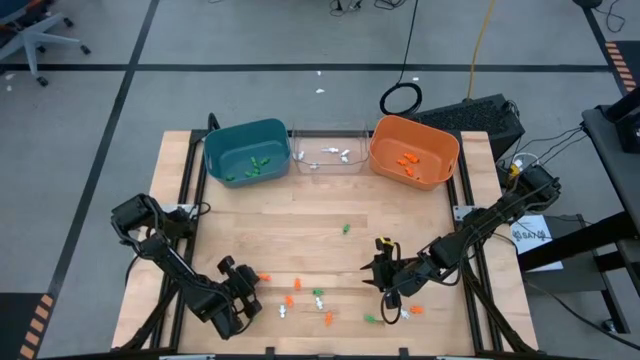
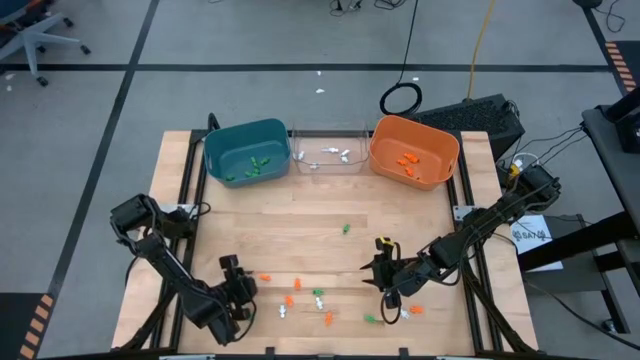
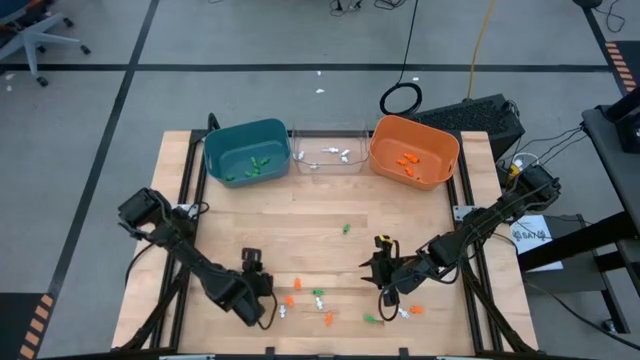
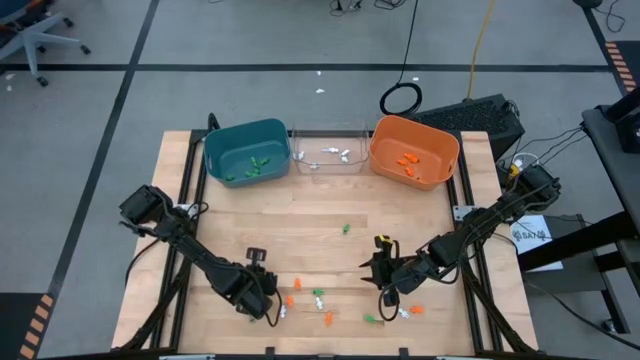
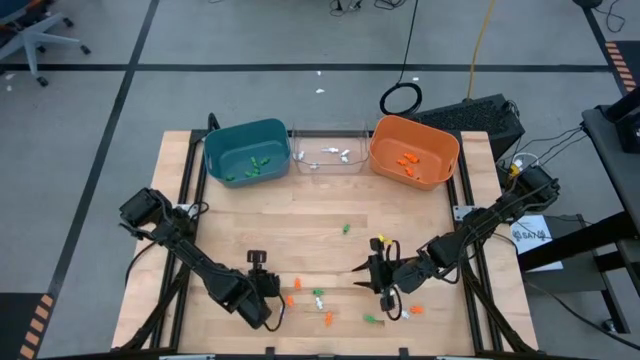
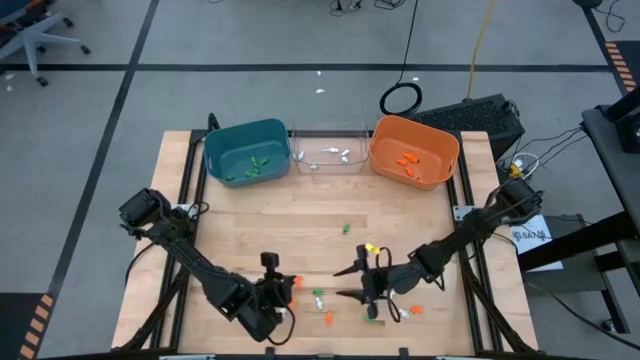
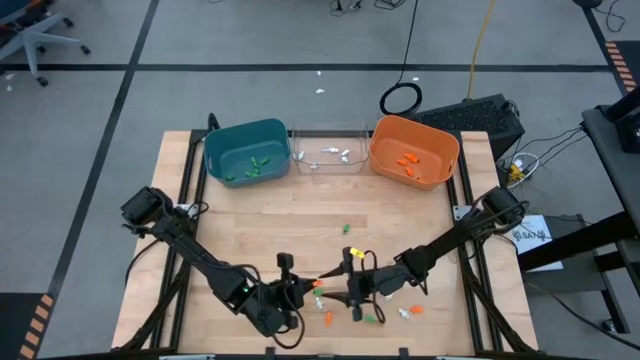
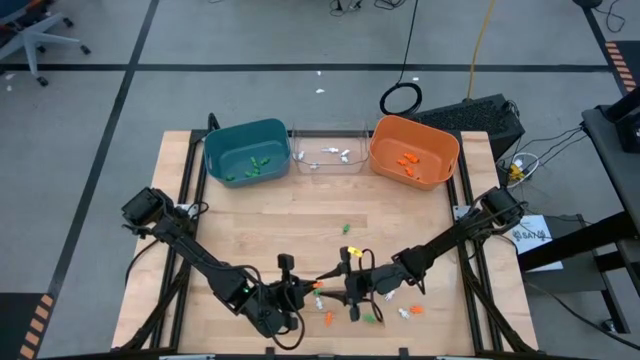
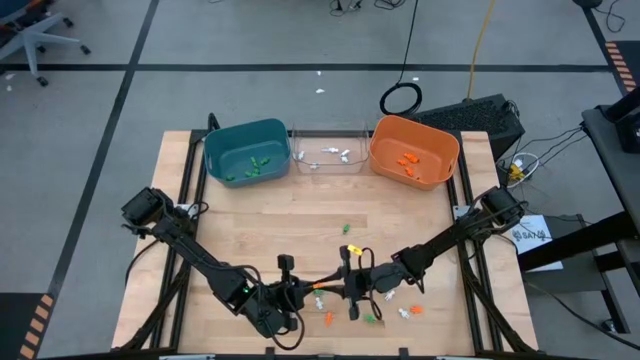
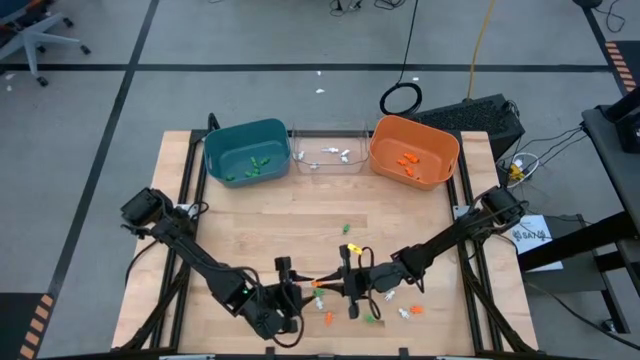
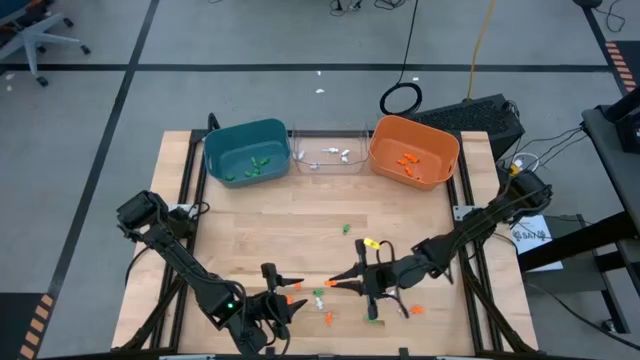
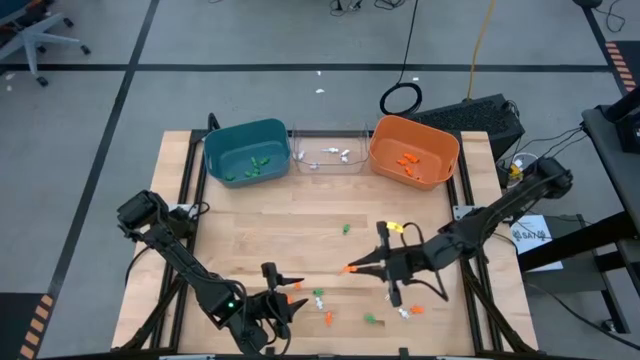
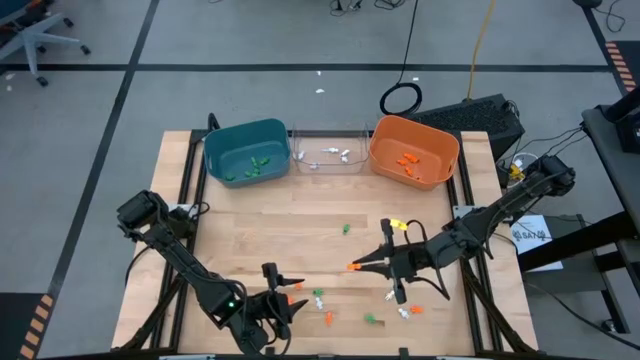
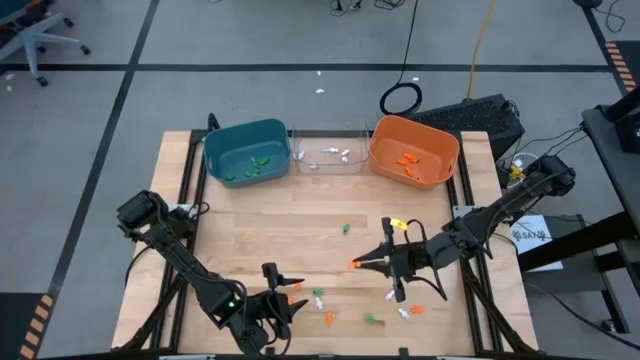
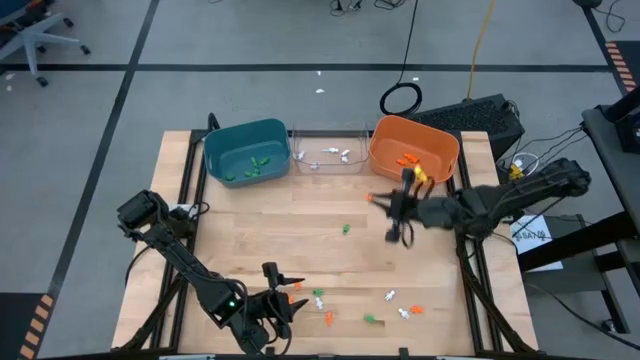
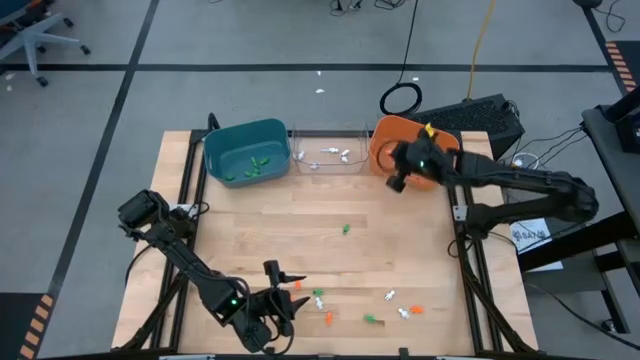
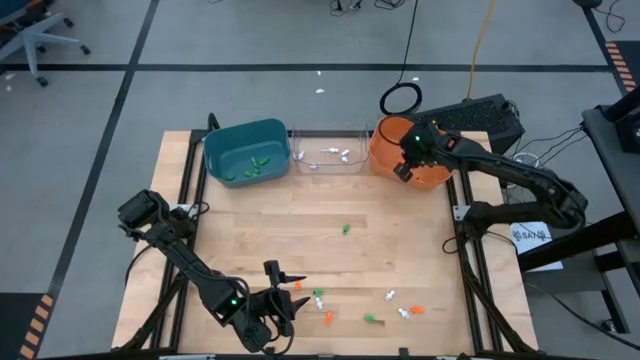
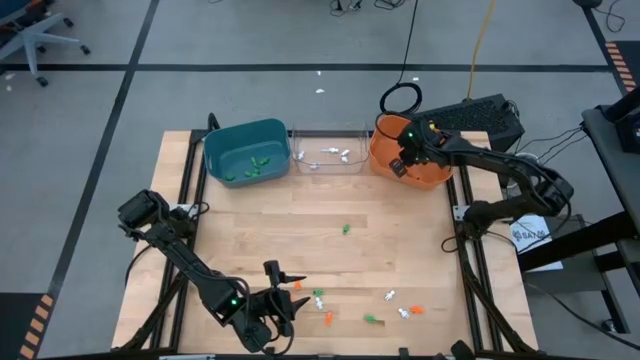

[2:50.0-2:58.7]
Task: Sort Halloween decoration
Put the orange skeleton toy into the orange bin

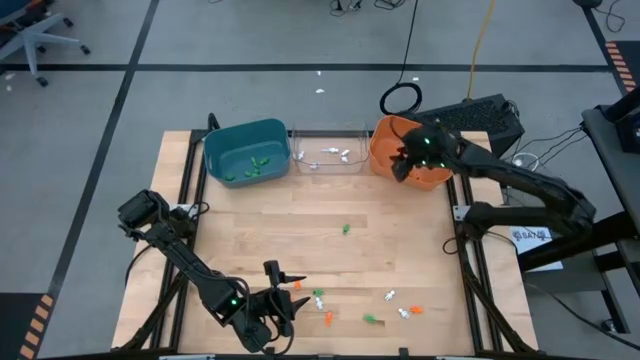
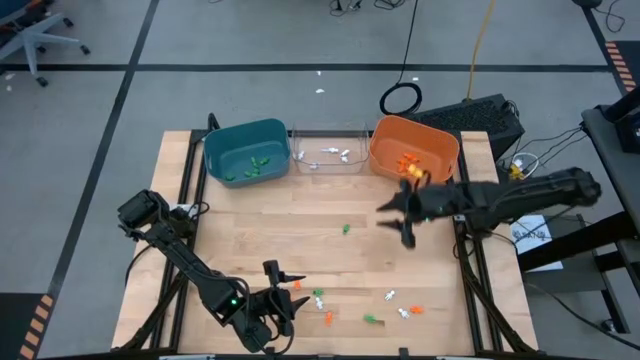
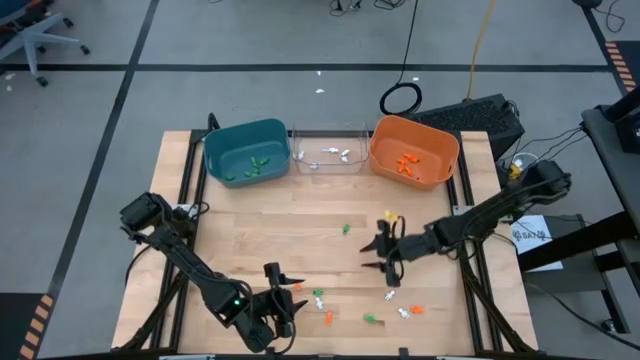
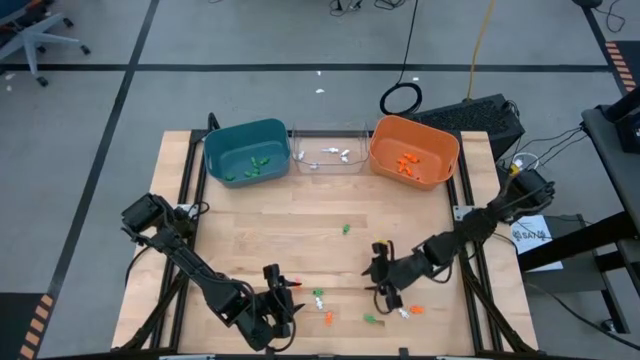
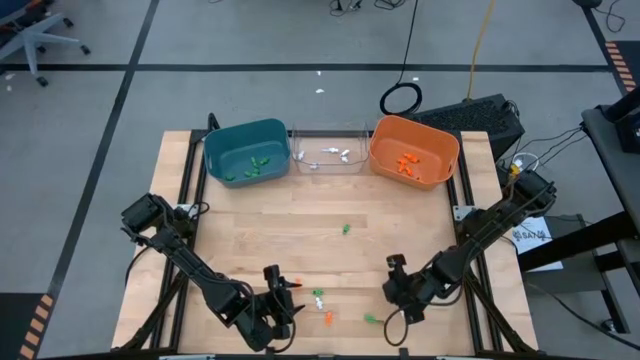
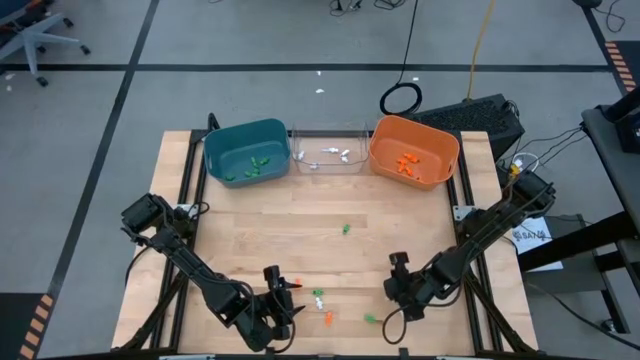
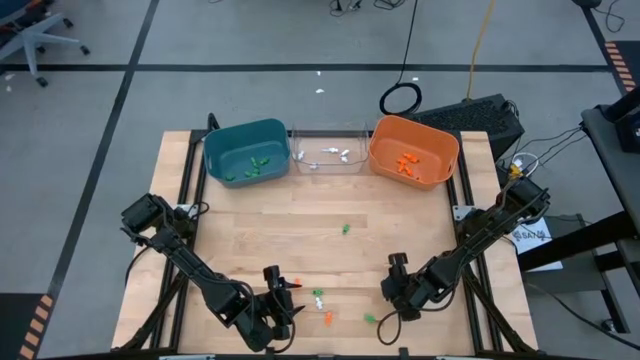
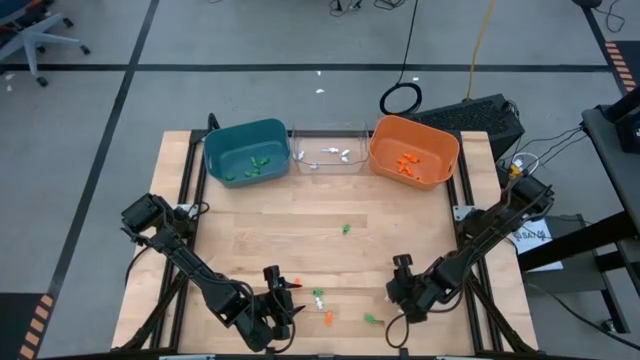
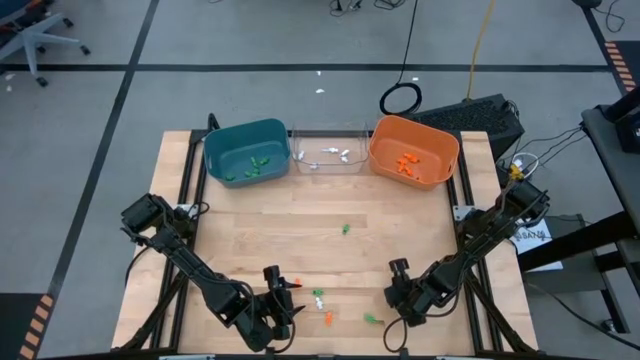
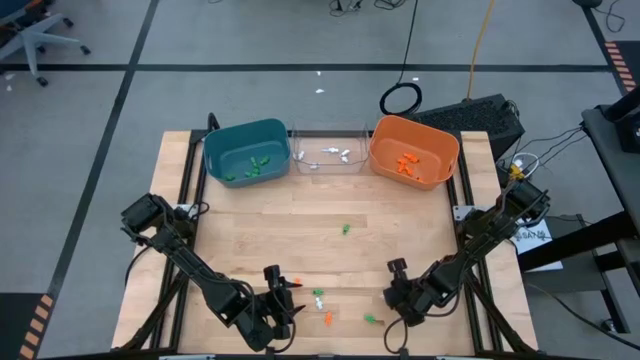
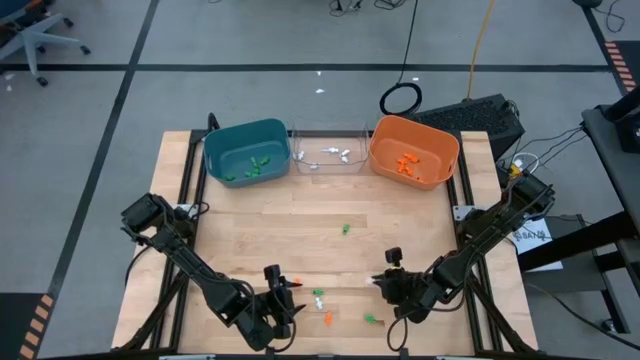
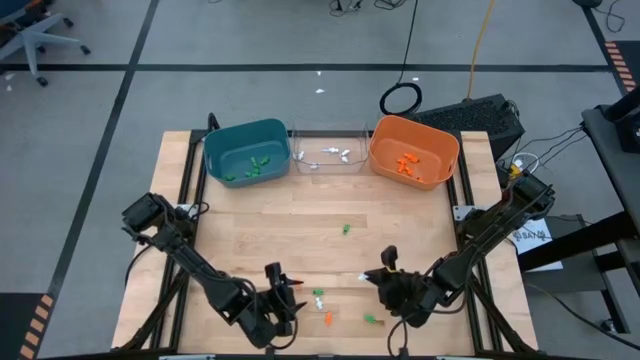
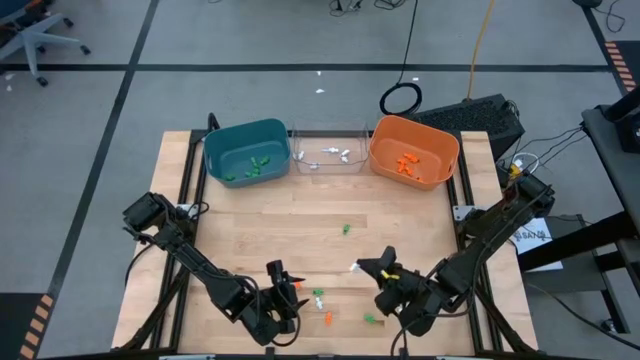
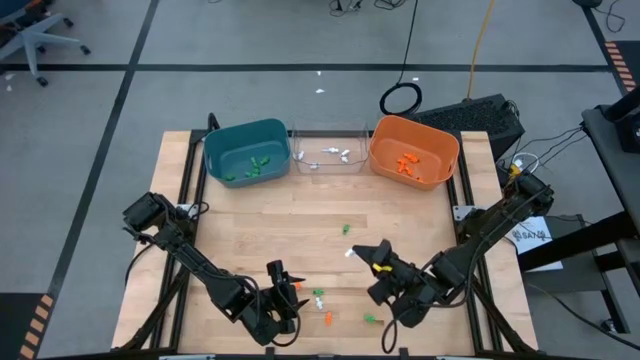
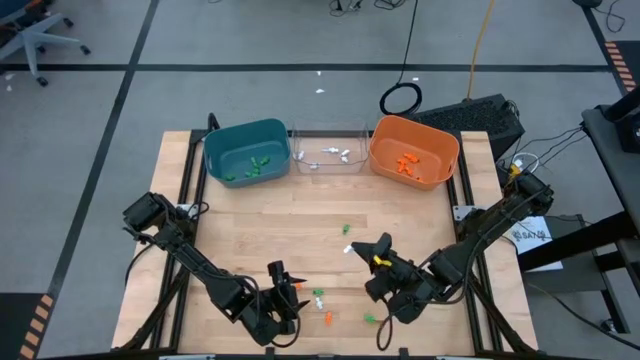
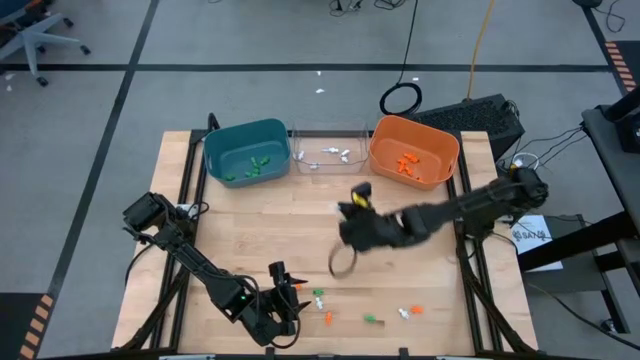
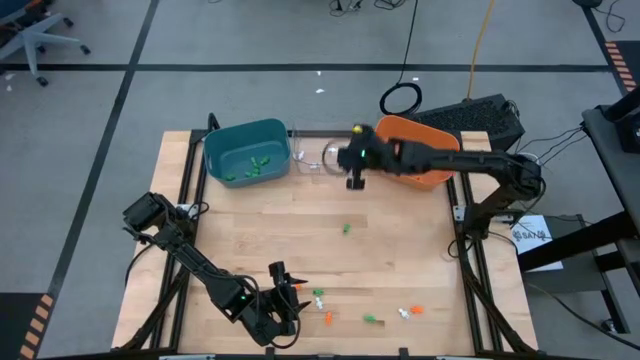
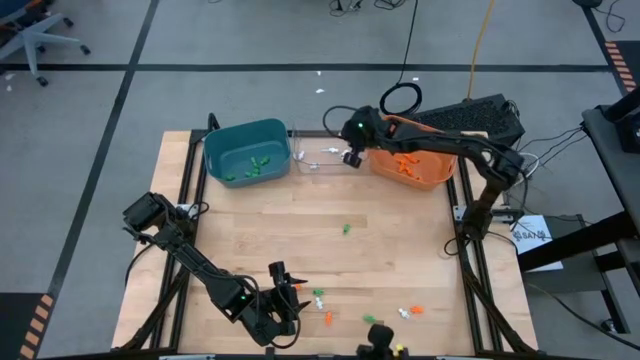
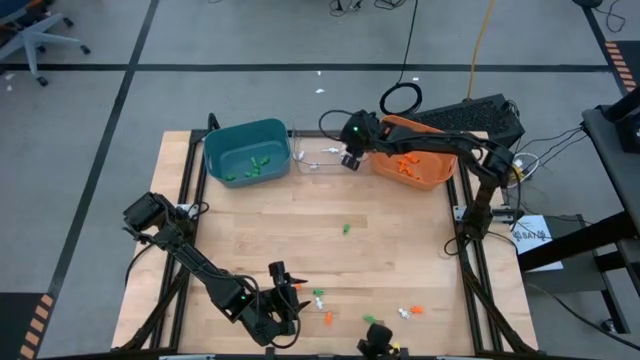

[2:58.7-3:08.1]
Put the white skeleton toy into the transparent bin

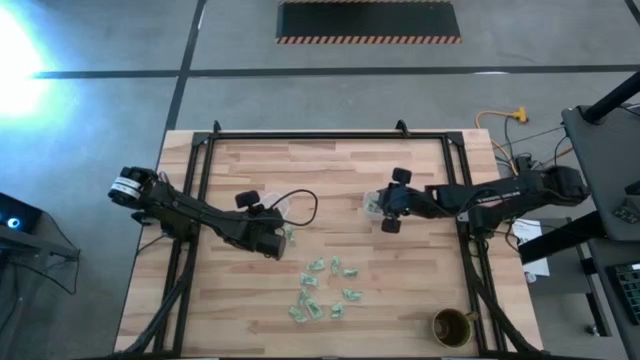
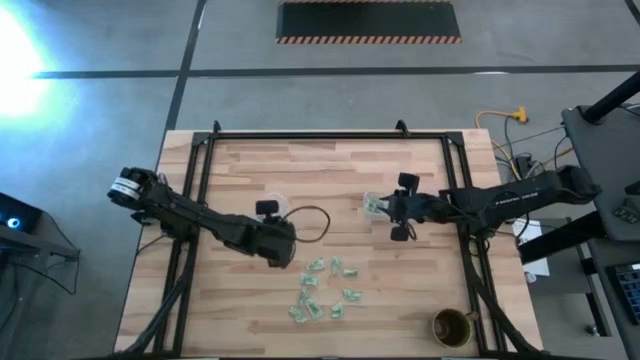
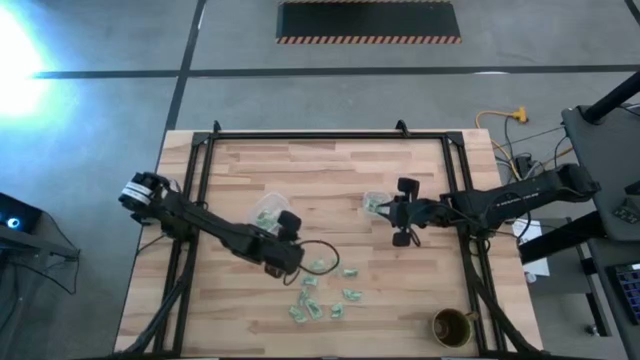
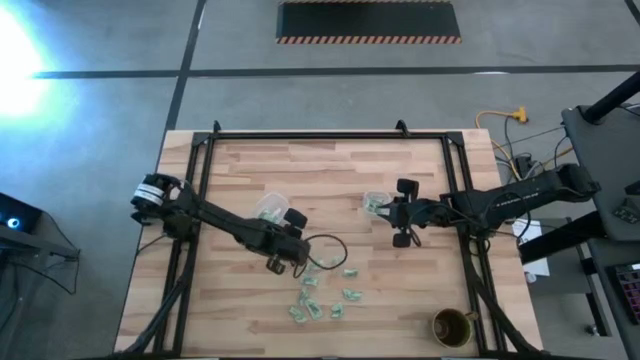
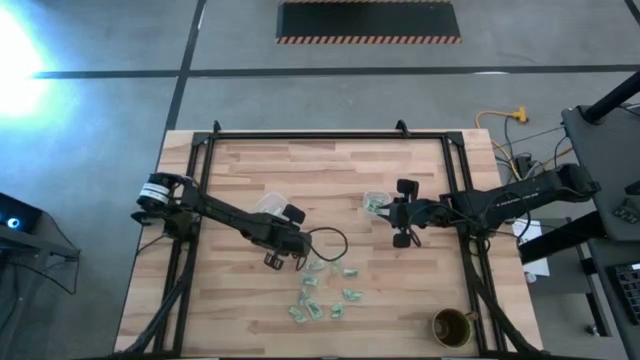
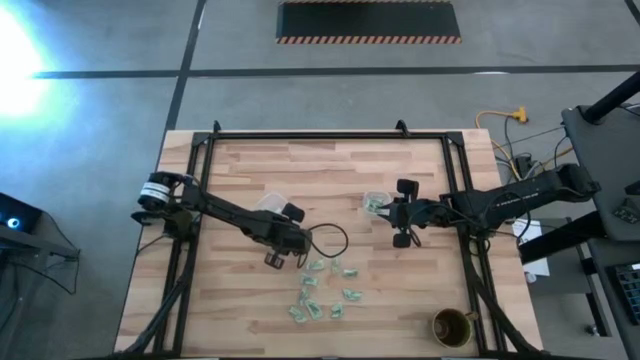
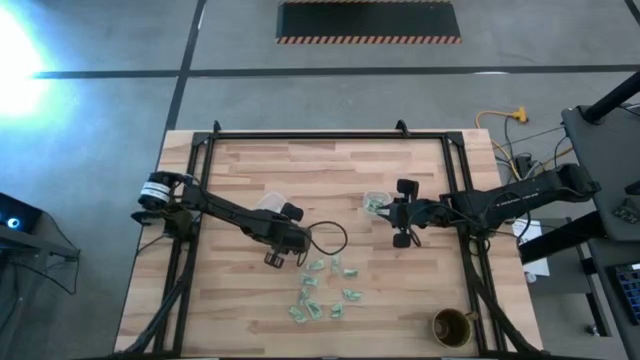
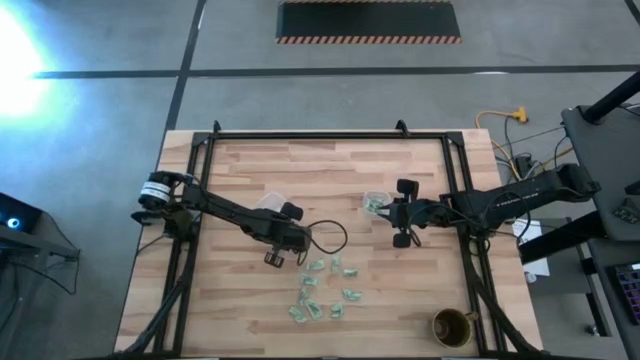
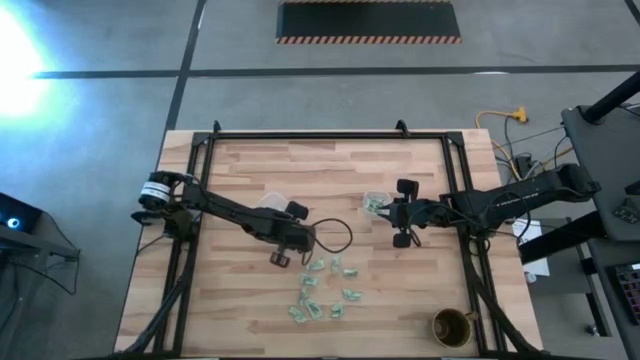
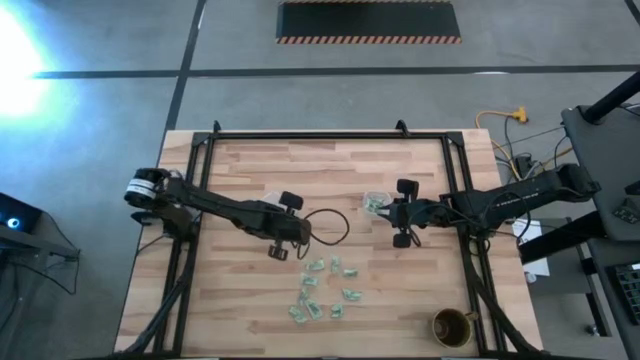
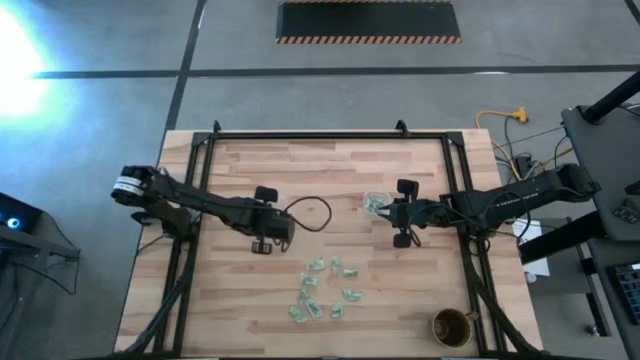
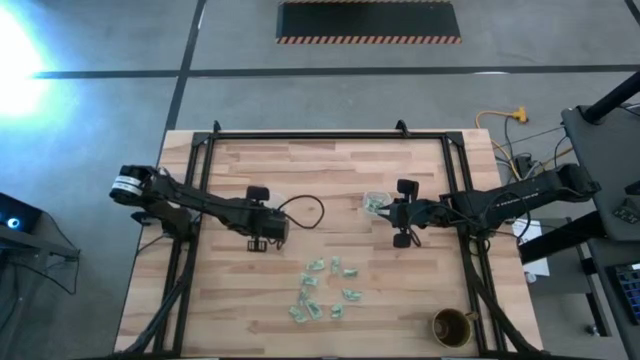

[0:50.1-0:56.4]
Task: Pick and place Stevia / Truvia into bins
Put the light green stevia packet into the left transparent container
